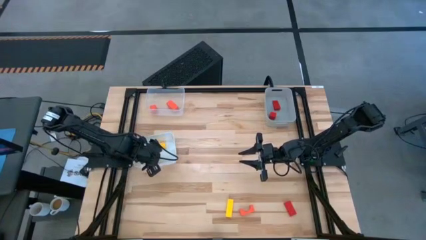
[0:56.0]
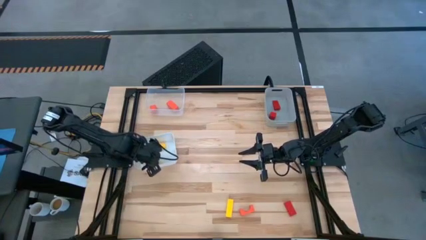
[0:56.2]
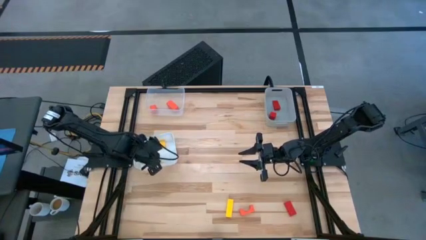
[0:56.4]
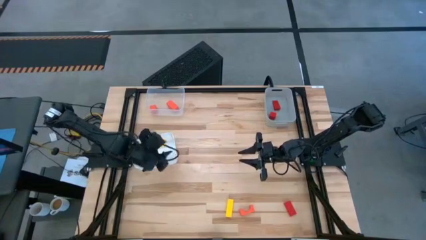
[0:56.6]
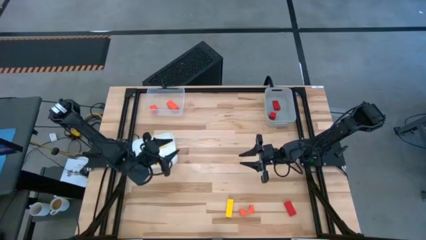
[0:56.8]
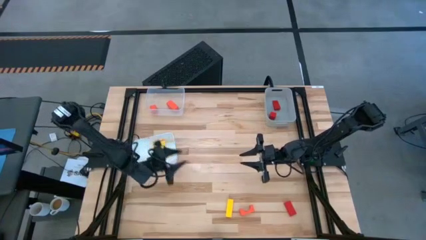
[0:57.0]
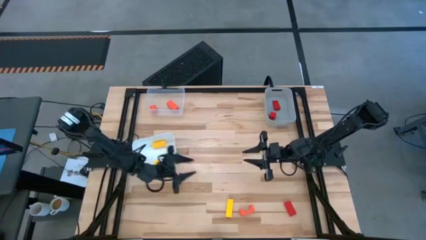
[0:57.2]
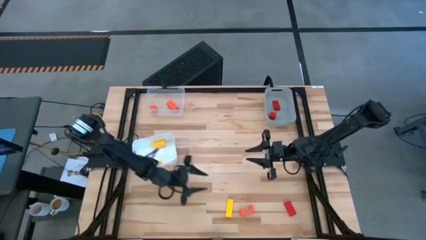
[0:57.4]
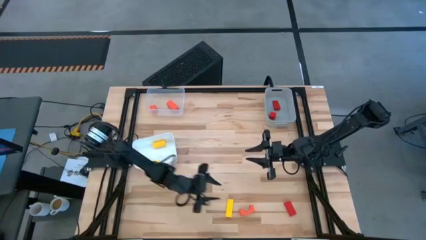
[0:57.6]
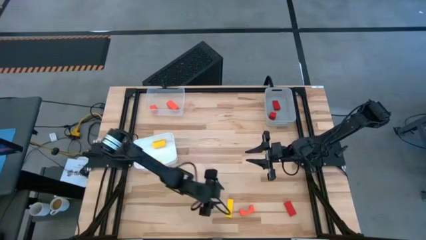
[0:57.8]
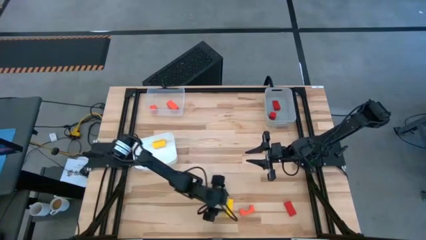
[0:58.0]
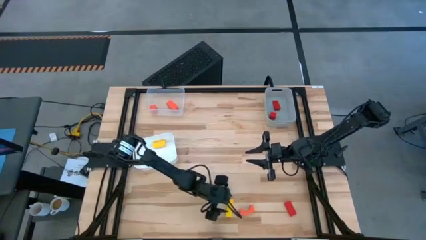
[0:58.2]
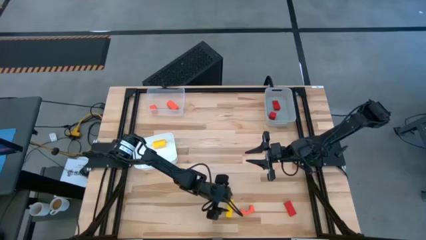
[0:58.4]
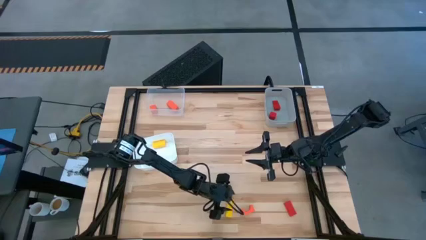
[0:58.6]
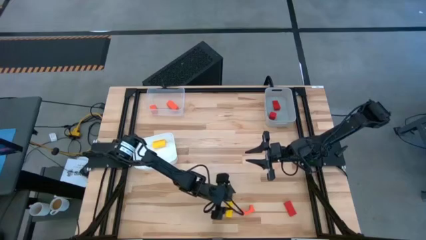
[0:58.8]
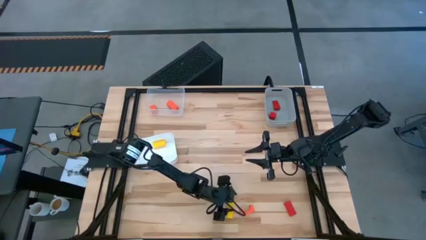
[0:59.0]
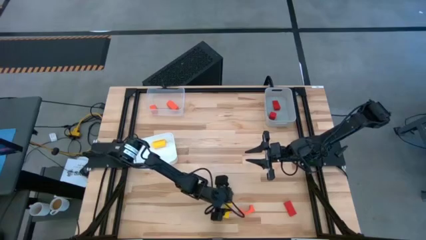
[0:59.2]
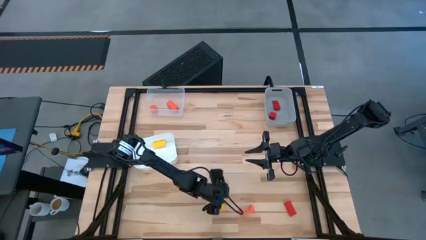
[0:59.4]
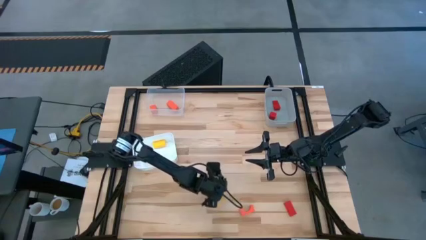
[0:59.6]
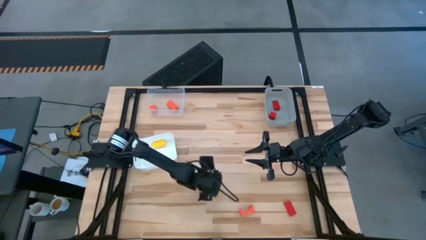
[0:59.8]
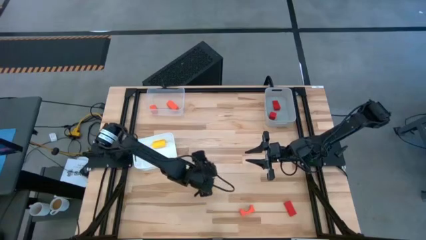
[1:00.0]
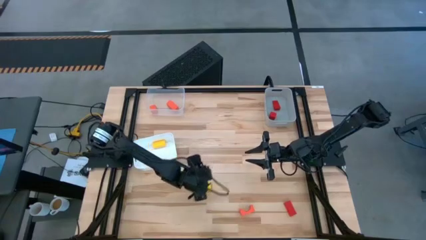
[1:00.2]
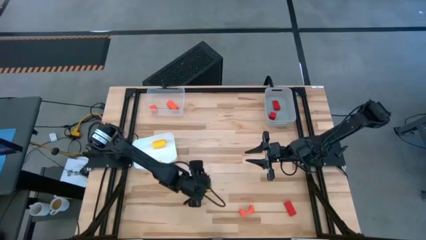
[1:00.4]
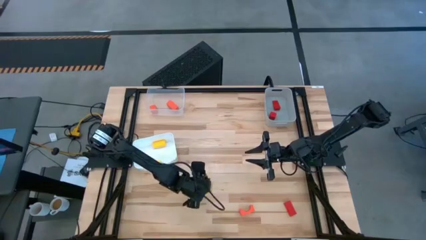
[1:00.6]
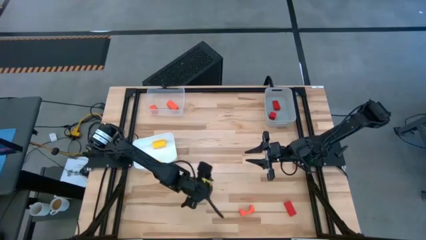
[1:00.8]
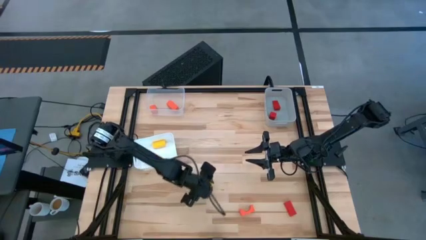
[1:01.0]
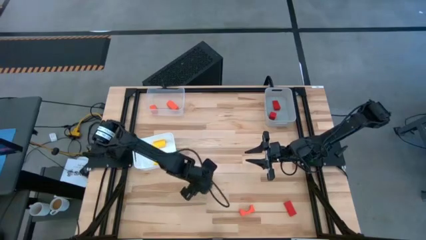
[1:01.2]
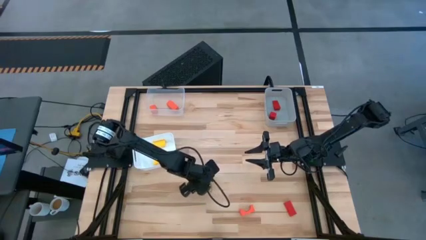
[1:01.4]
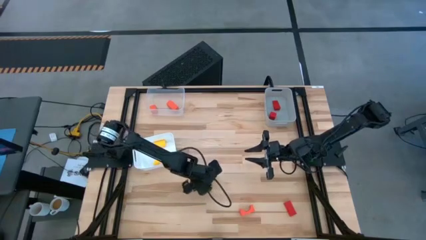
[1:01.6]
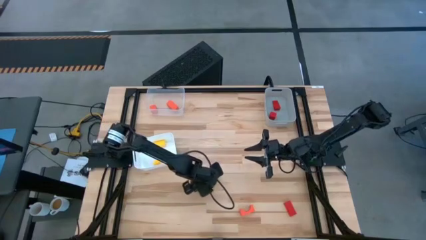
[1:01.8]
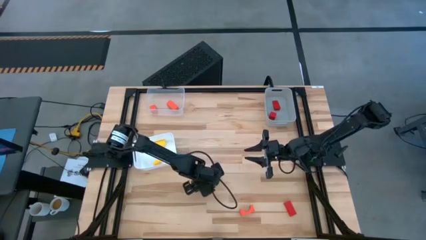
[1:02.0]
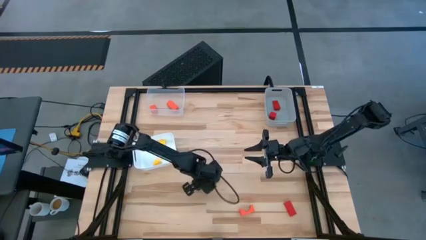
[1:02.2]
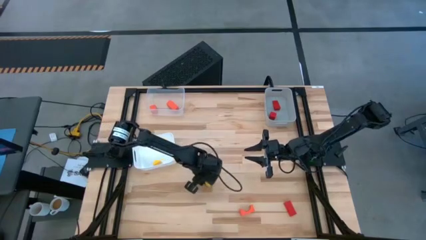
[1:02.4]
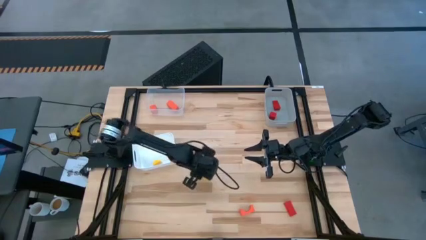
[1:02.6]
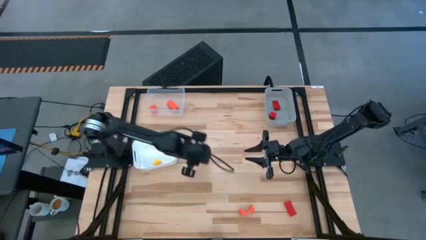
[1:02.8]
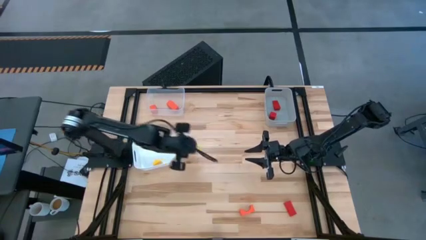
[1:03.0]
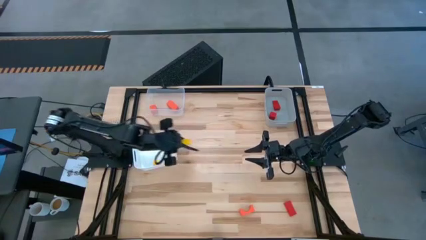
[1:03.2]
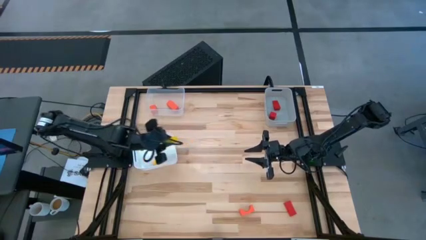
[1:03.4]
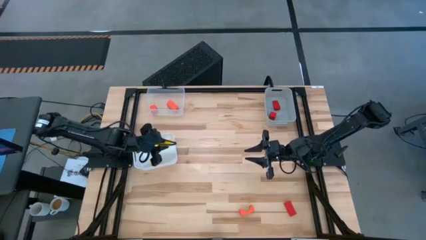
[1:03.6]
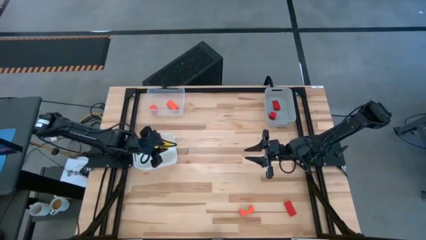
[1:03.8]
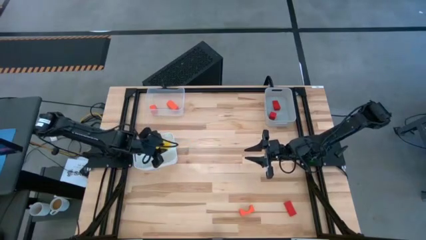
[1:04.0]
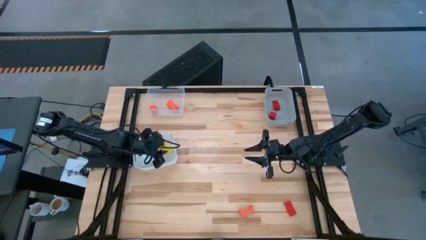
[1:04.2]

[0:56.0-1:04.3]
Task: Sort & place blocks by color
Put the yellow block into the white bin

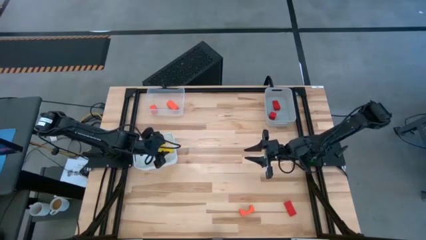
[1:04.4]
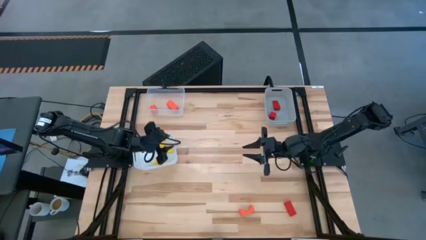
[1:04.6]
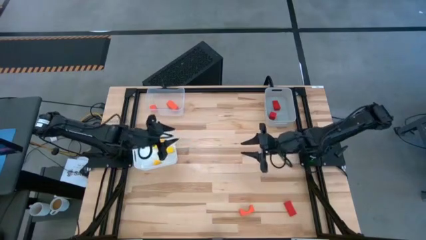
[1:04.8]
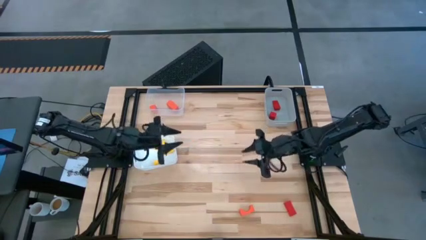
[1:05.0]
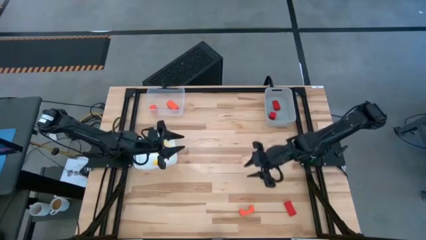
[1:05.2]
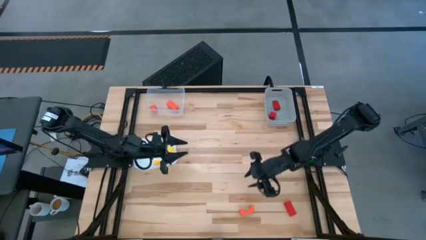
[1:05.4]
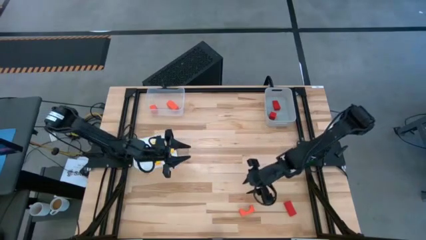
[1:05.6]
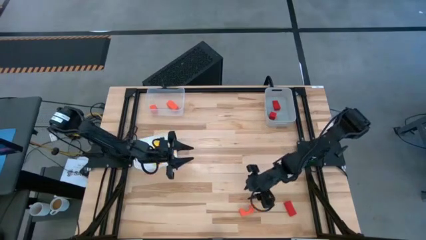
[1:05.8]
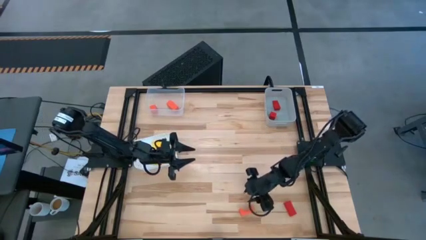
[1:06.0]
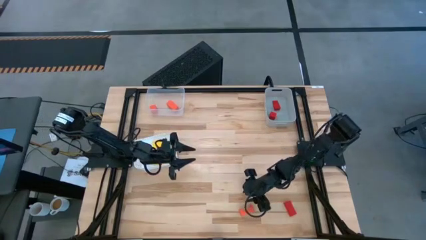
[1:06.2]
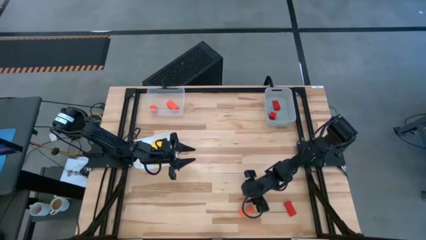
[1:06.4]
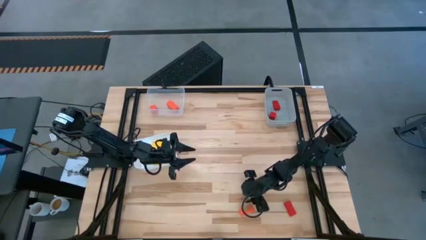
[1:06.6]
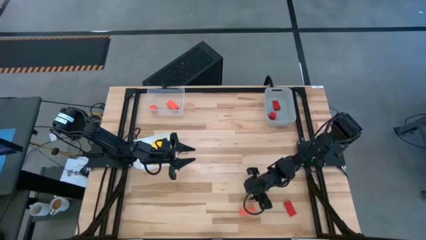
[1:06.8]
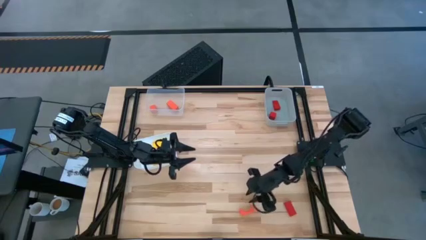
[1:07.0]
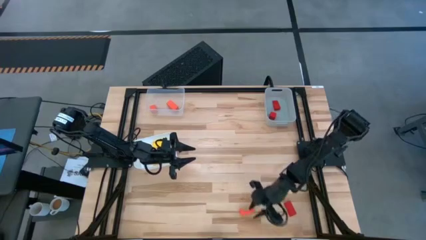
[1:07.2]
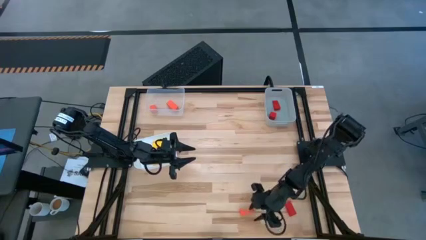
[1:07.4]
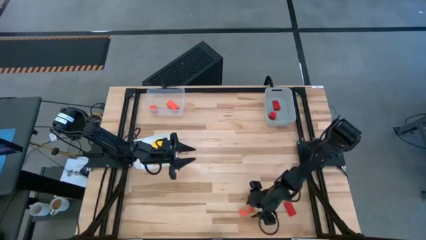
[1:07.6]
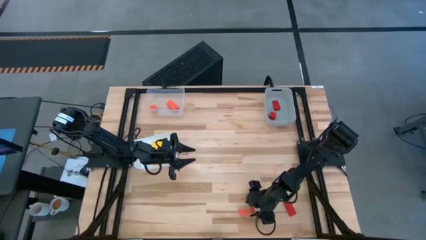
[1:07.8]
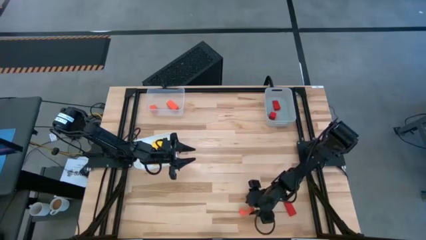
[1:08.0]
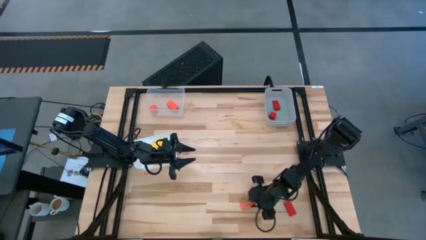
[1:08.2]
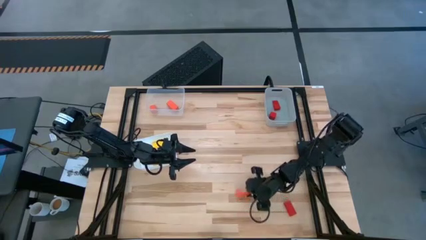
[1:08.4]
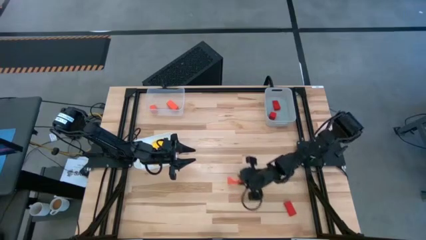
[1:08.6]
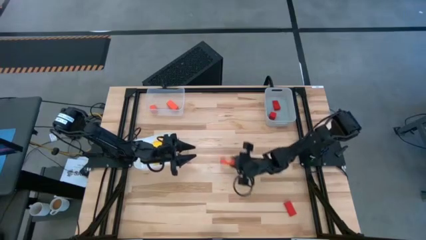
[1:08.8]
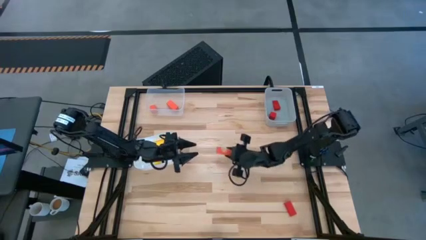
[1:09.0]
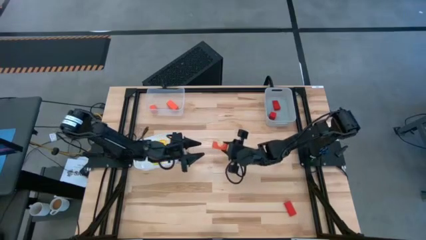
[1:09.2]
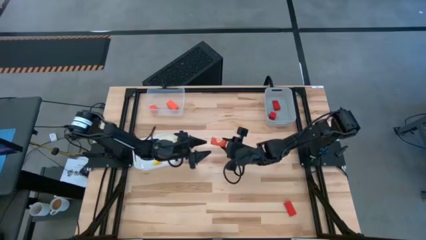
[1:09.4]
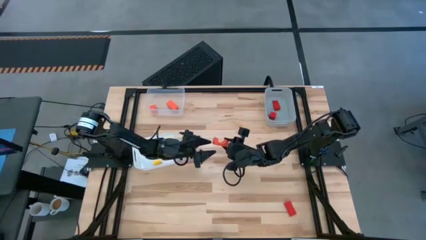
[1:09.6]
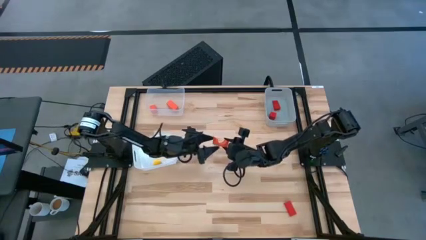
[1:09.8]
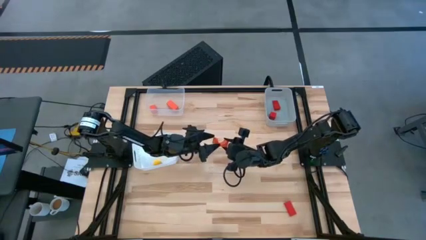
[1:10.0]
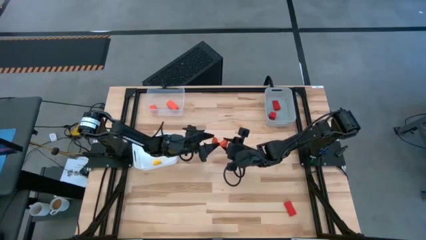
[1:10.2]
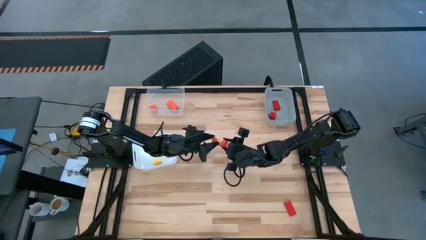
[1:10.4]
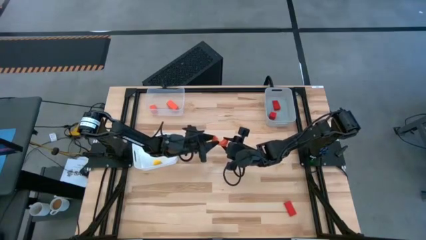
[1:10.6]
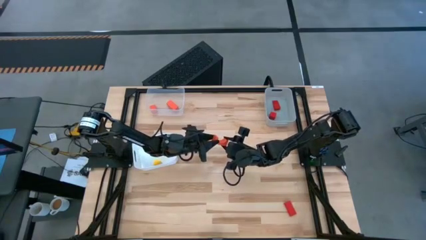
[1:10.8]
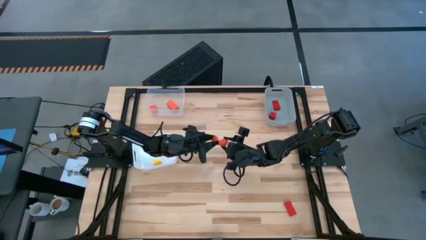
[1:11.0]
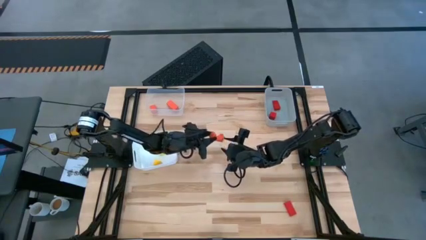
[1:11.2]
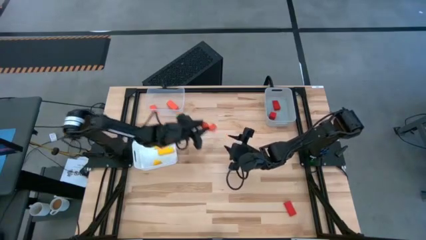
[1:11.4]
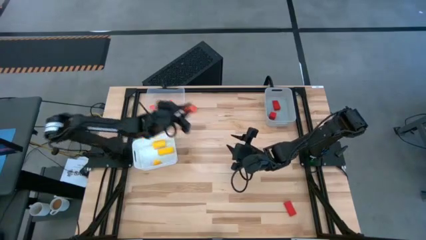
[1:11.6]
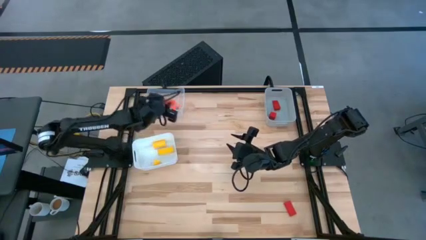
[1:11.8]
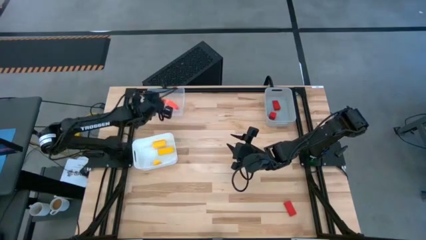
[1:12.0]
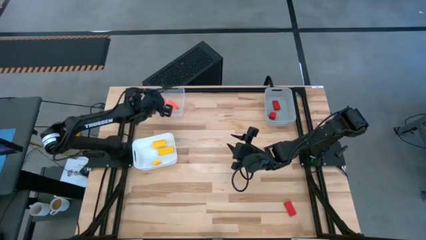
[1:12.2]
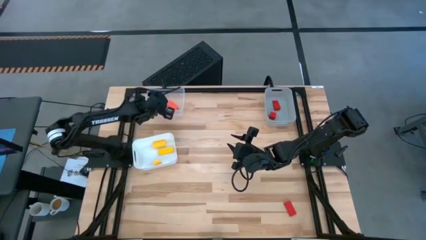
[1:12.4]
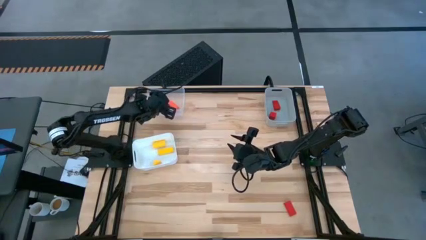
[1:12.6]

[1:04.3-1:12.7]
Put the orange block into the transparent bin
